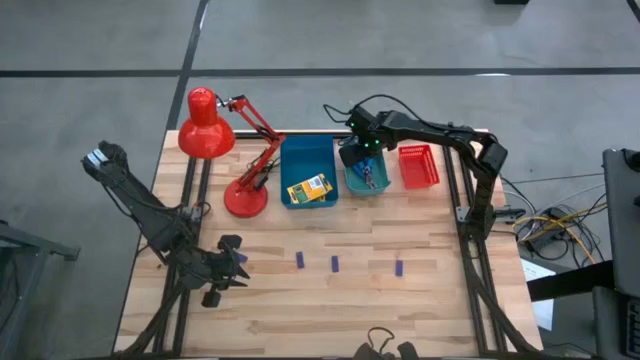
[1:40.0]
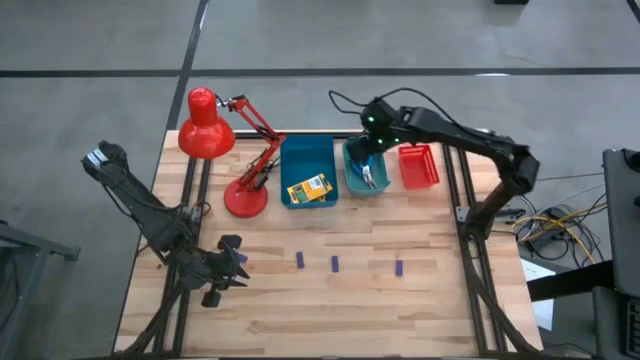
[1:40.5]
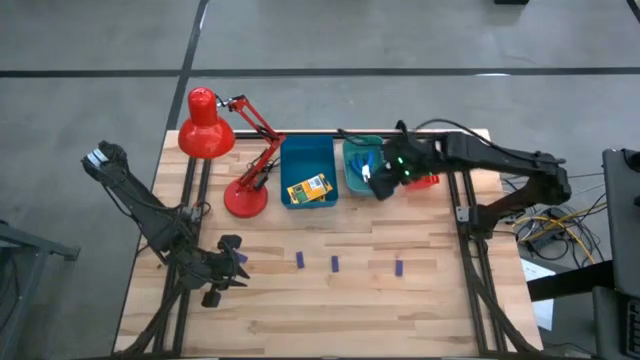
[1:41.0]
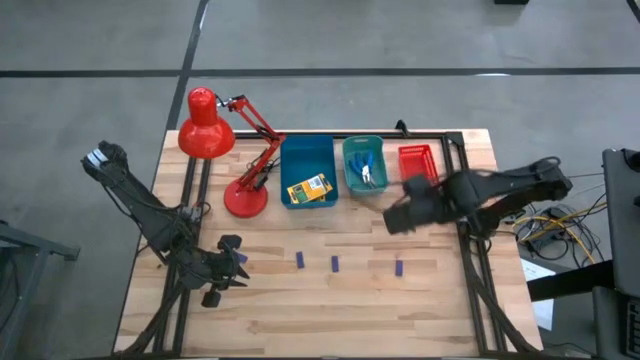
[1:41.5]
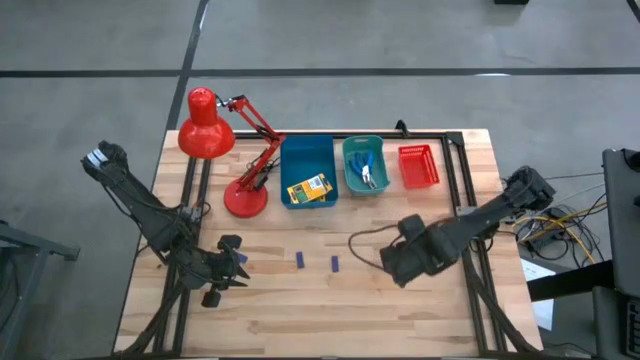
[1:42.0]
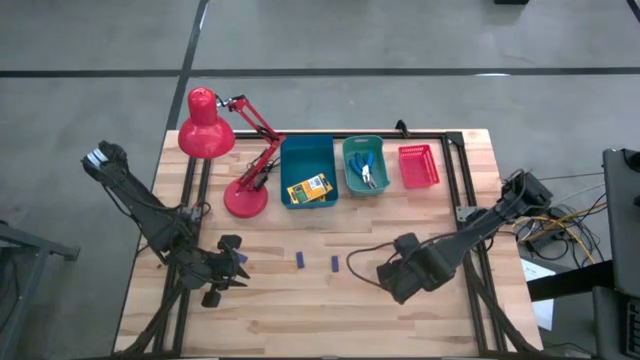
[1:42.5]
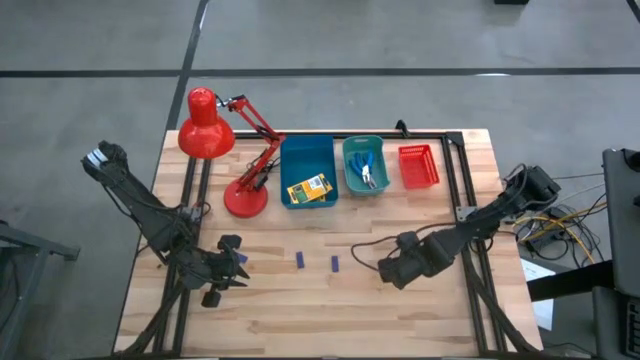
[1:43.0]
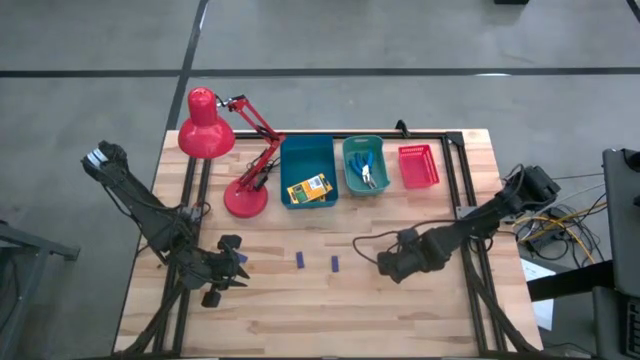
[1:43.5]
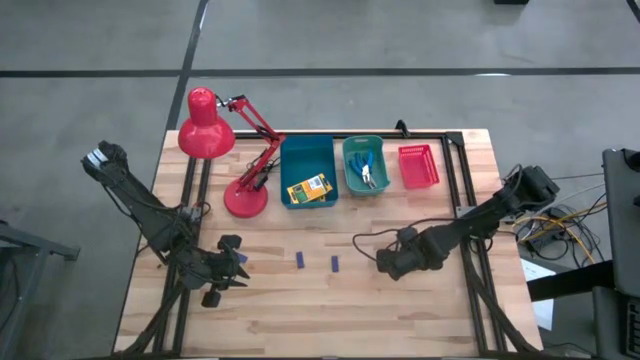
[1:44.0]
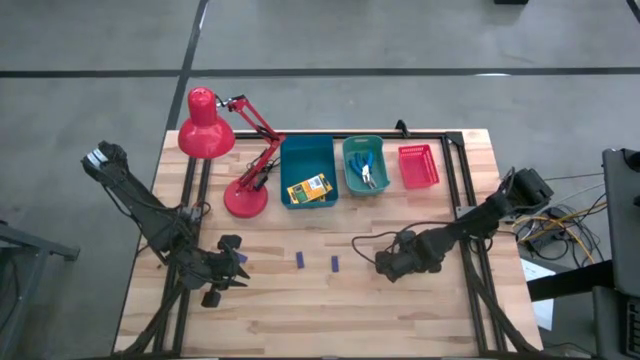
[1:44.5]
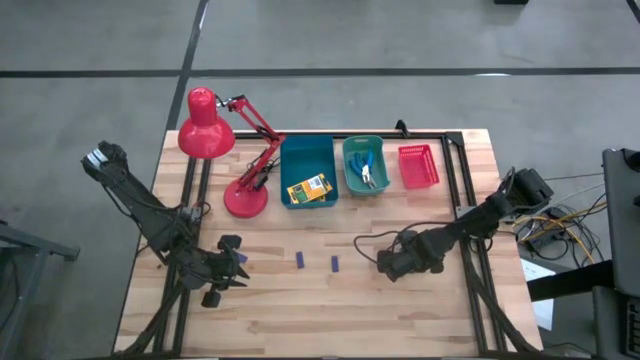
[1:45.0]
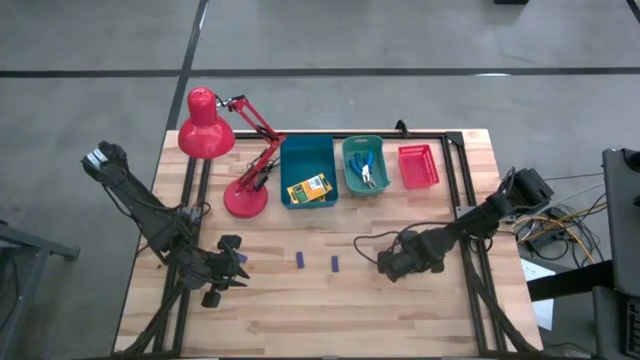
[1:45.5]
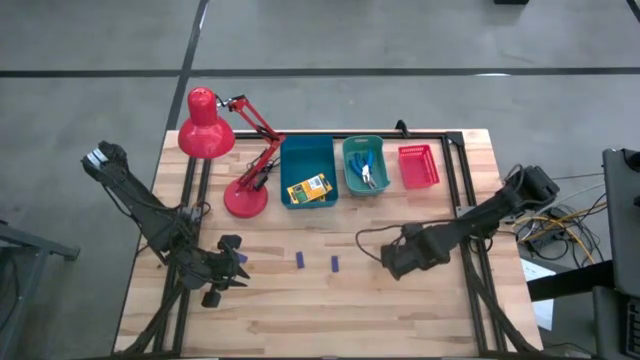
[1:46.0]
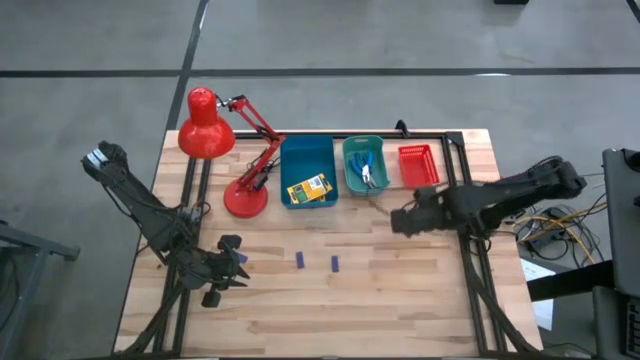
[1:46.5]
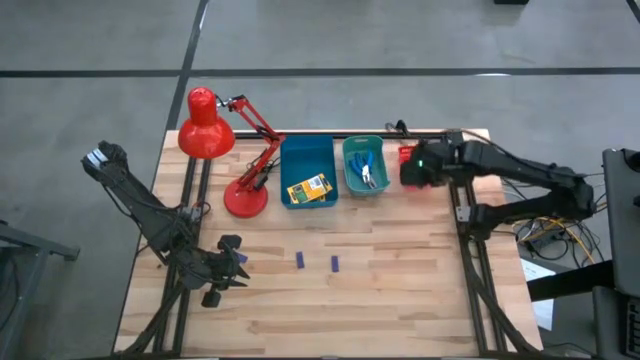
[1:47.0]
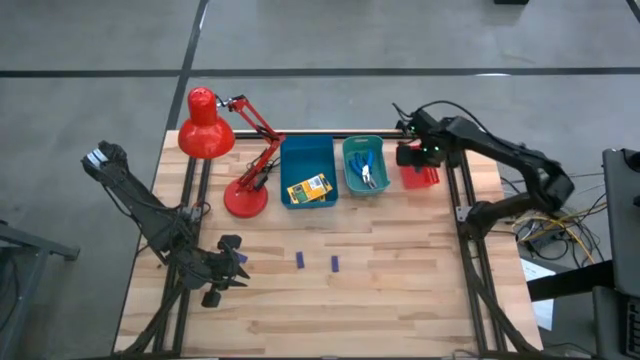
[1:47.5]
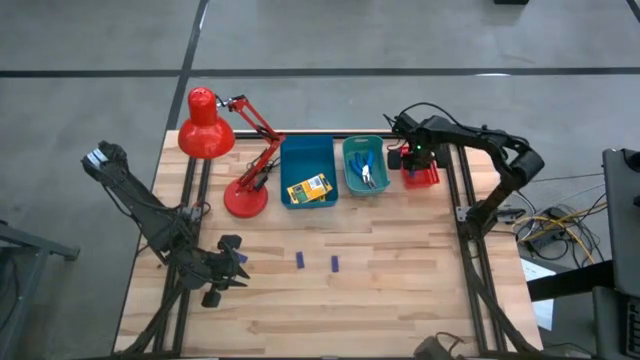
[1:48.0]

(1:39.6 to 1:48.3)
Task: Pick & Place School Supplies
Put the blue eraser into the red bin

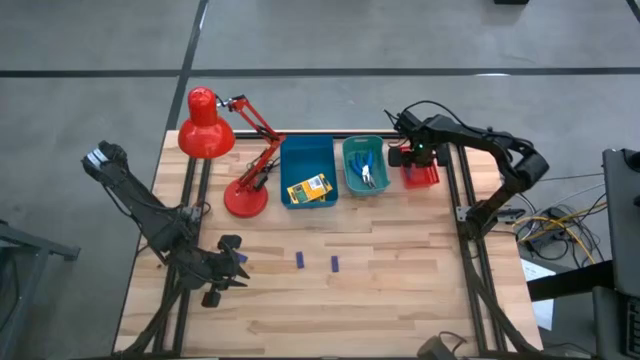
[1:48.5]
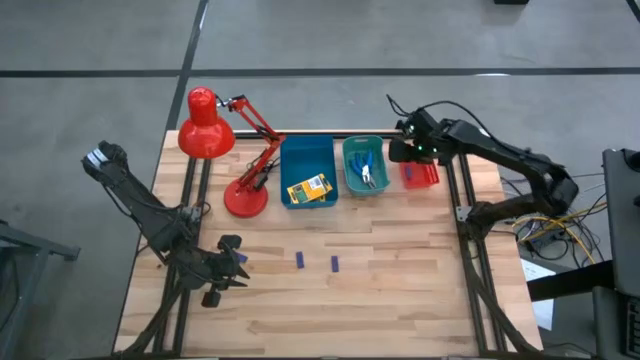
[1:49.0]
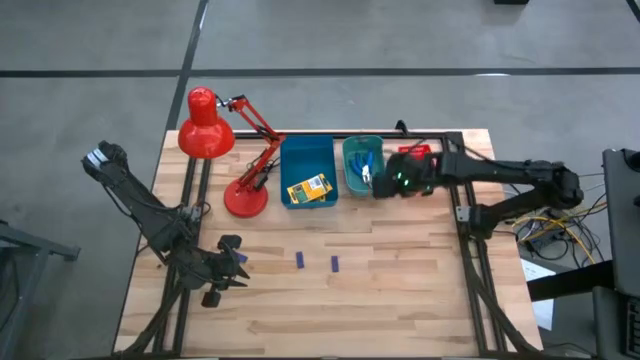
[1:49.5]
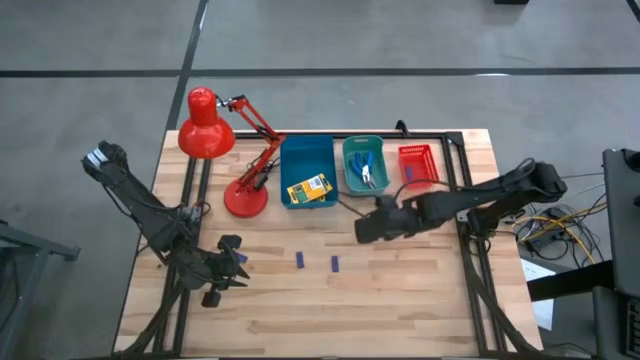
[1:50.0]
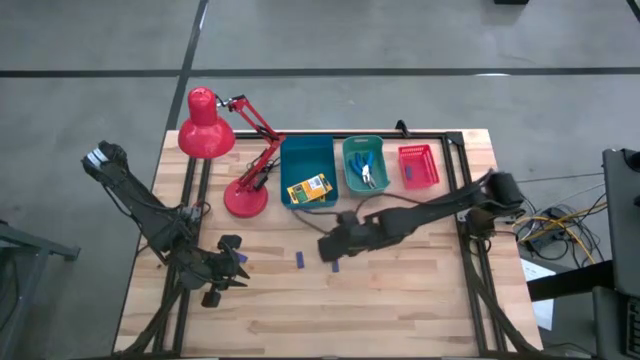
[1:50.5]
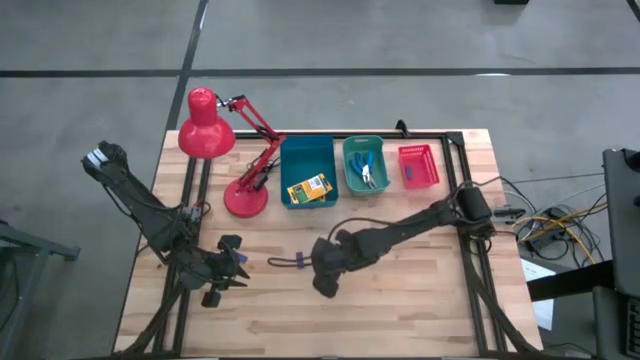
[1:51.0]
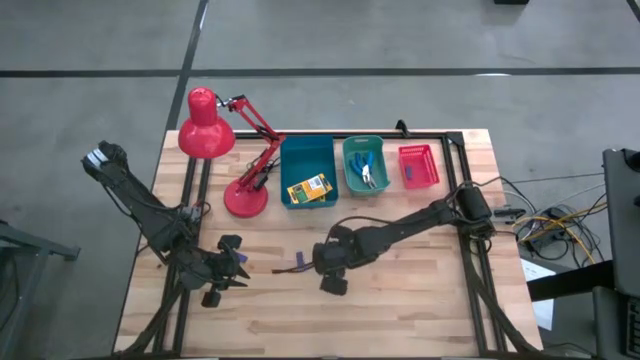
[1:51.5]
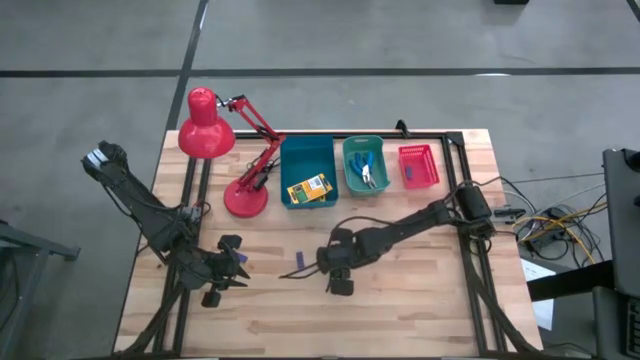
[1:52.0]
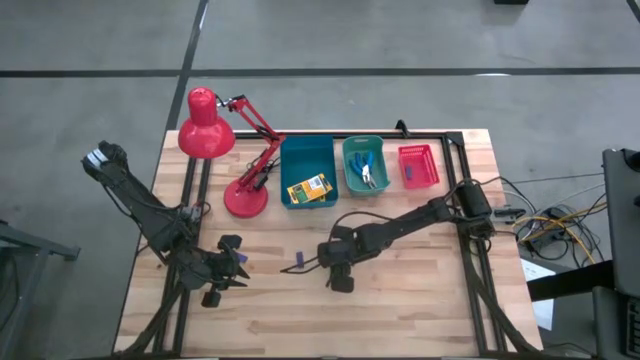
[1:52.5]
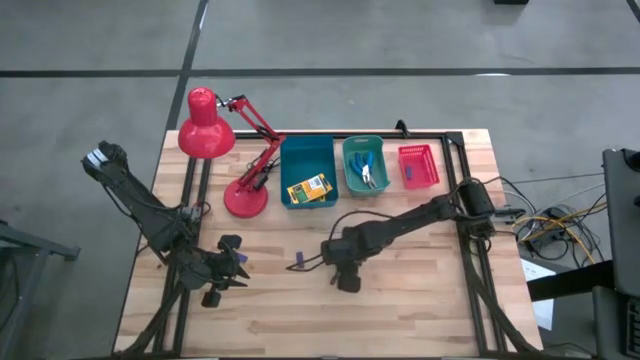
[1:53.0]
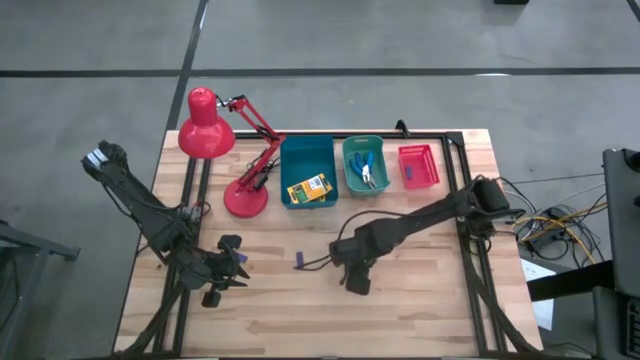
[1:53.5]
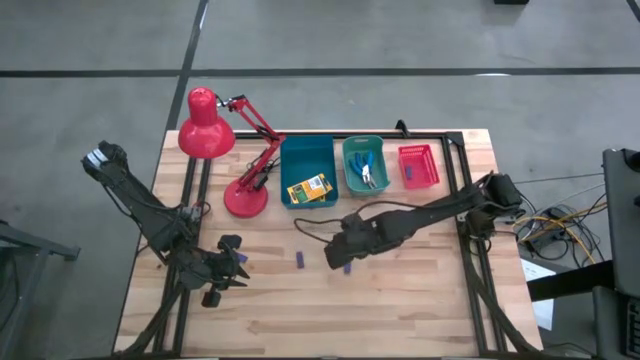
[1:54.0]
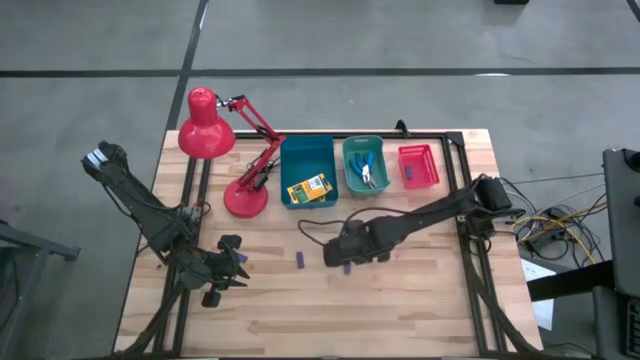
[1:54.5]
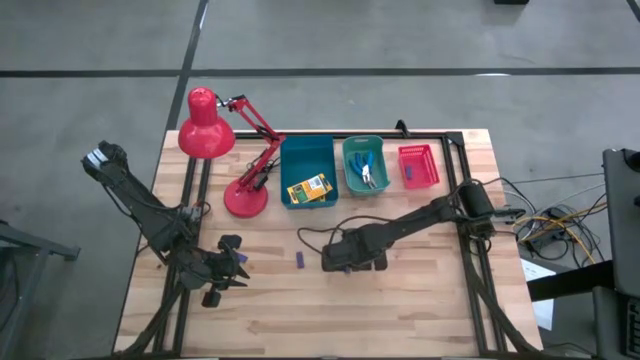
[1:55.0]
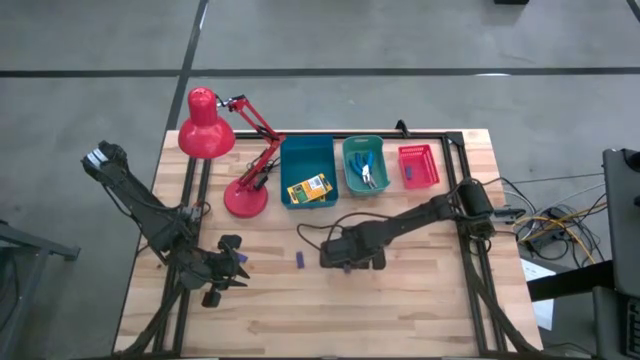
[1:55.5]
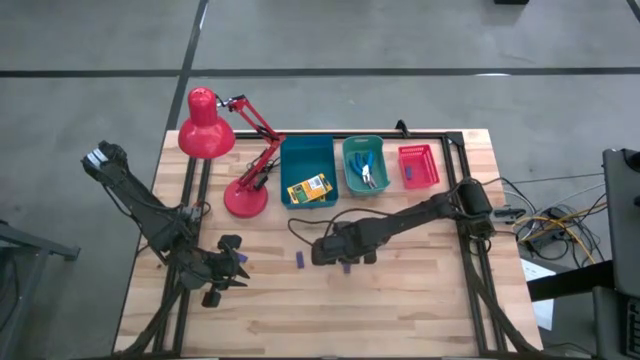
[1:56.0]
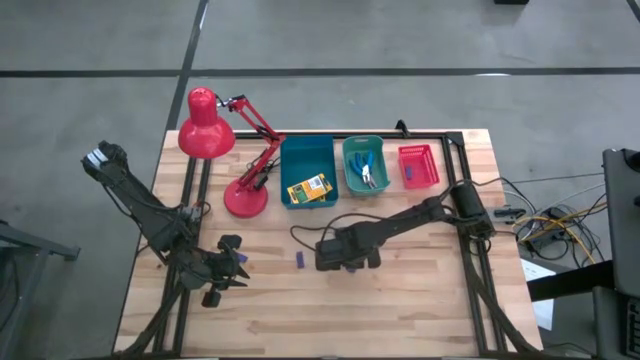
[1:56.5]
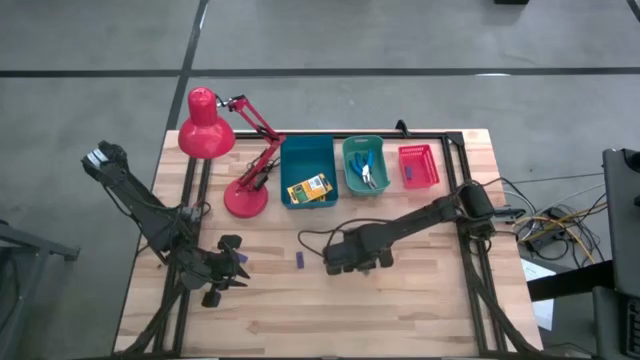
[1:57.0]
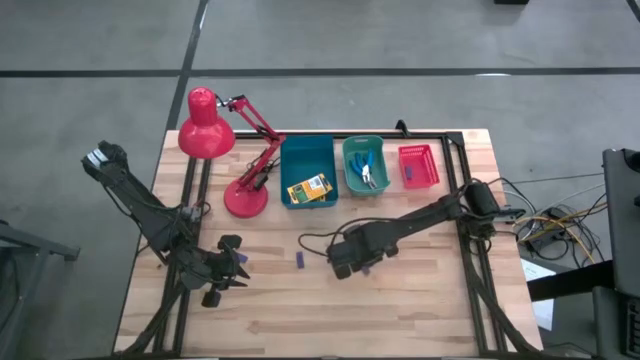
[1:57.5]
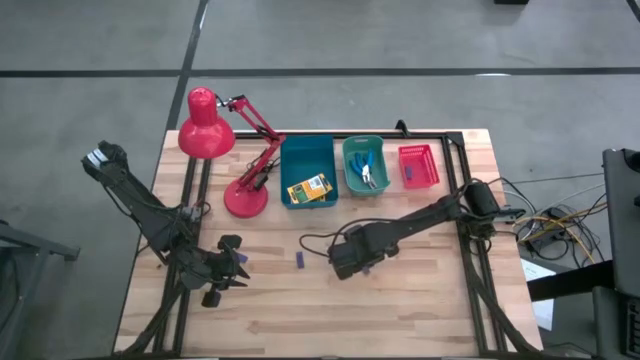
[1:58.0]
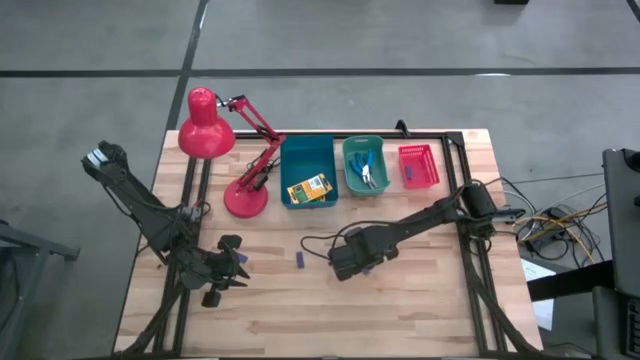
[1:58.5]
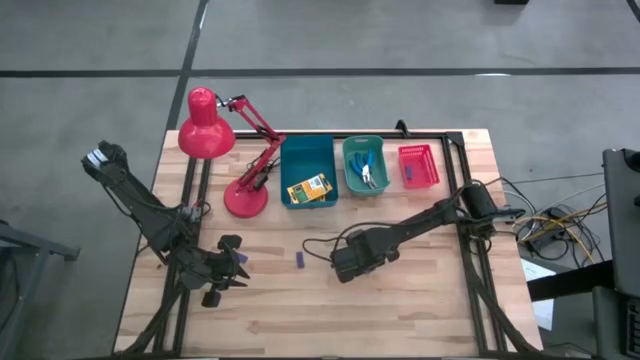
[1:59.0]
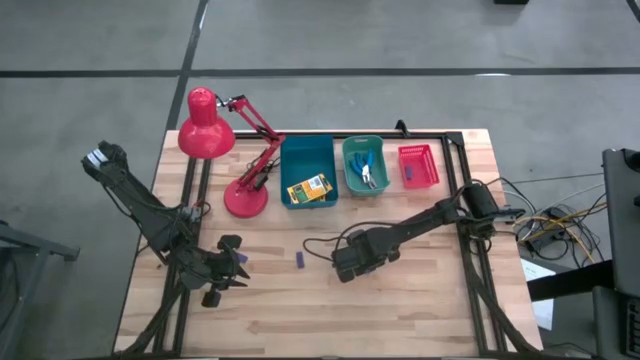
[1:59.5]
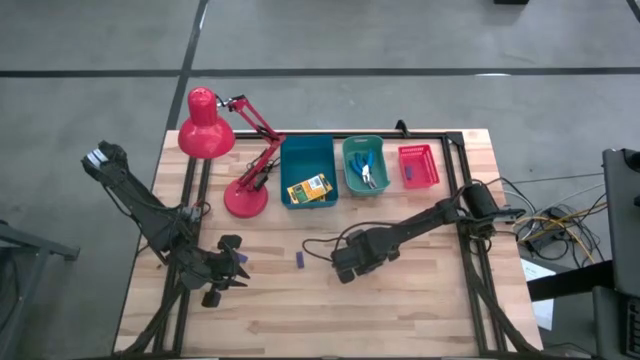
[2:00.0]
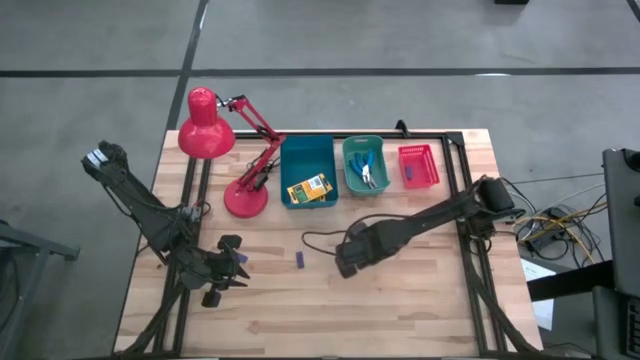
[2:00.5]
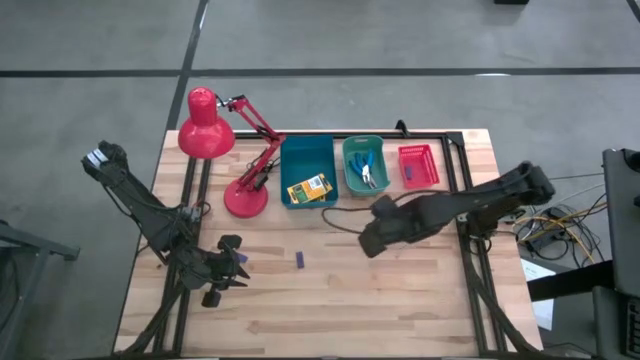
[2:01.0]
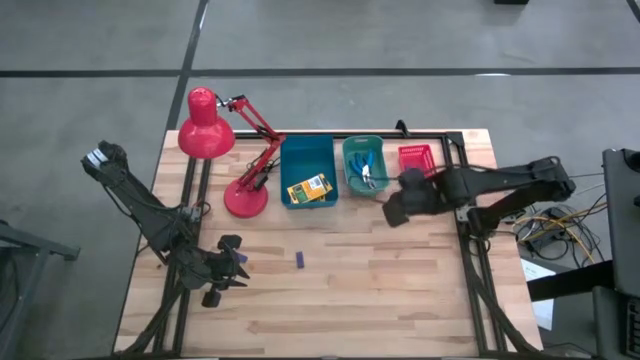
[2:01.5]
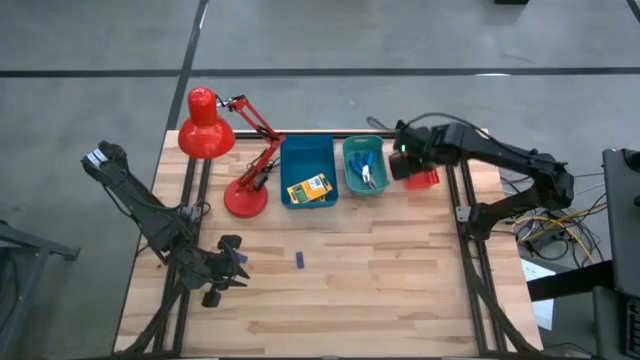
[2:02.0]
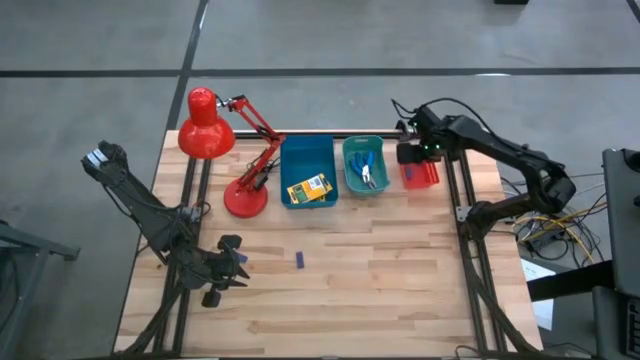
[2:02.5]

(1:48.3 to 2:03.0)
Put the blue eraser into the red bin
